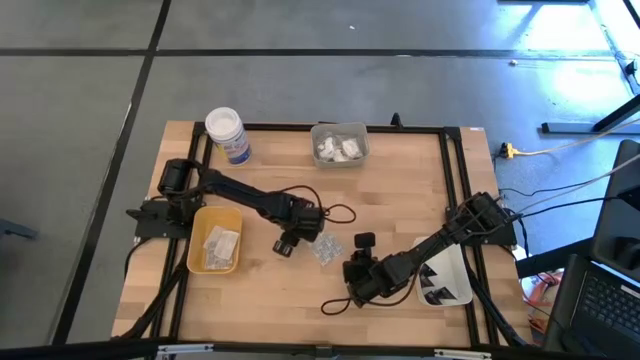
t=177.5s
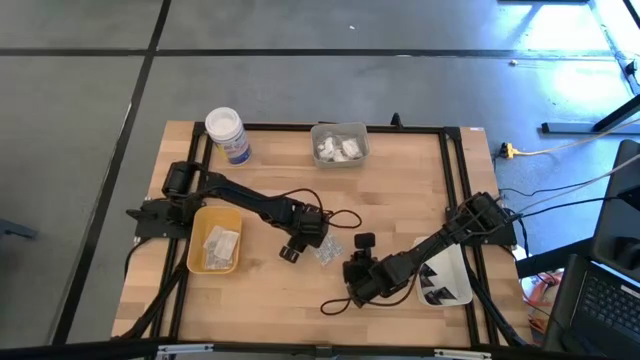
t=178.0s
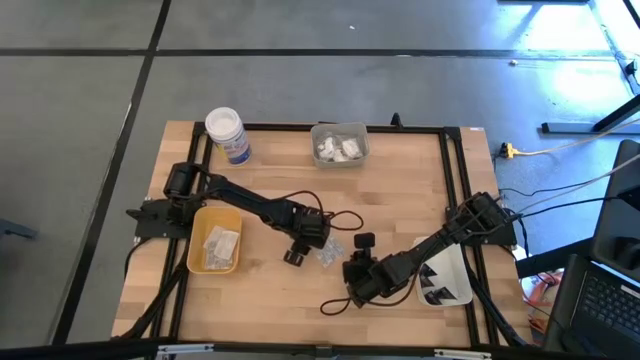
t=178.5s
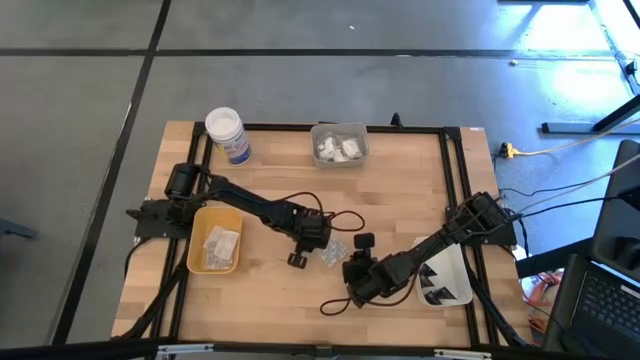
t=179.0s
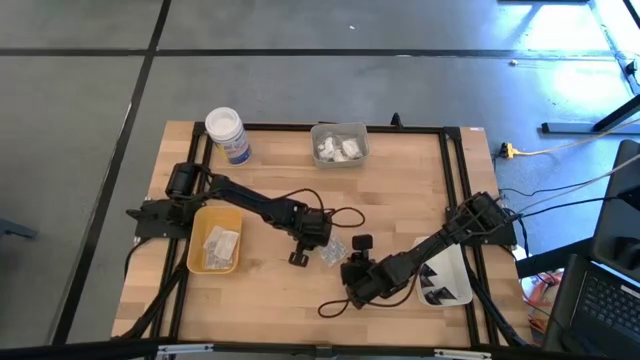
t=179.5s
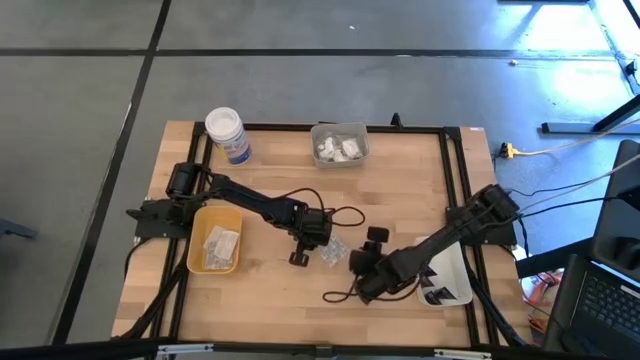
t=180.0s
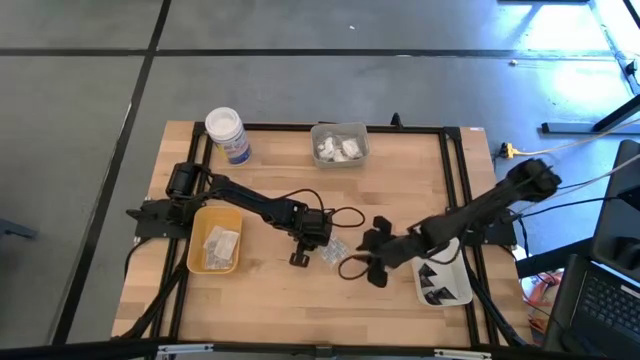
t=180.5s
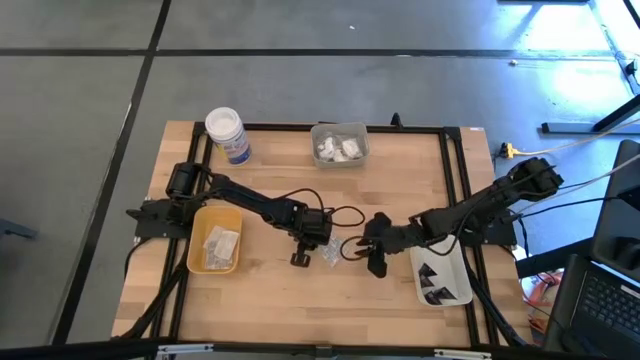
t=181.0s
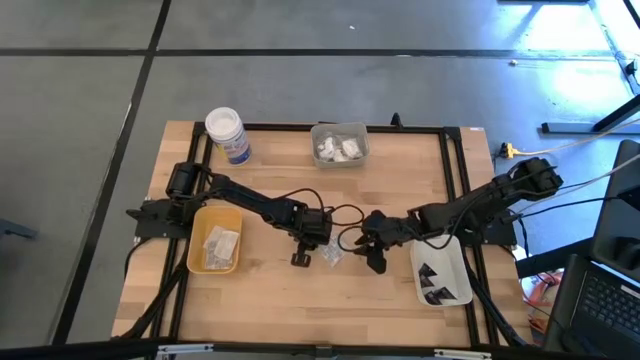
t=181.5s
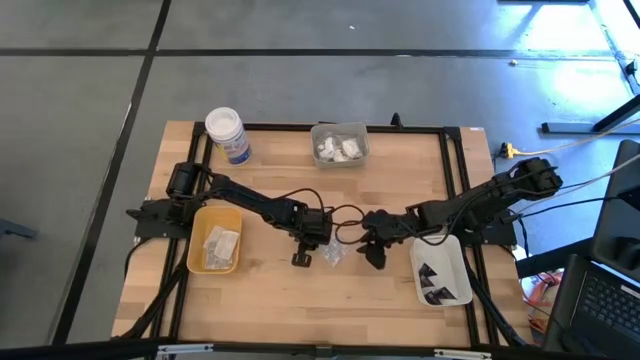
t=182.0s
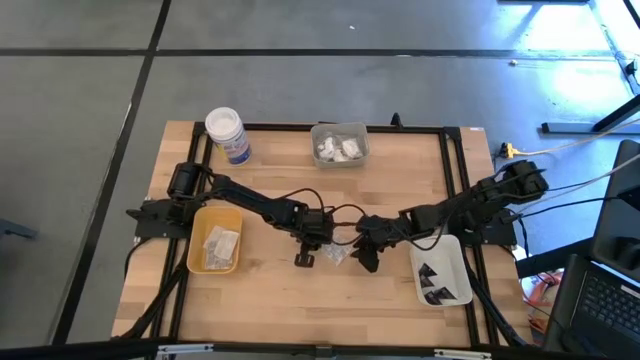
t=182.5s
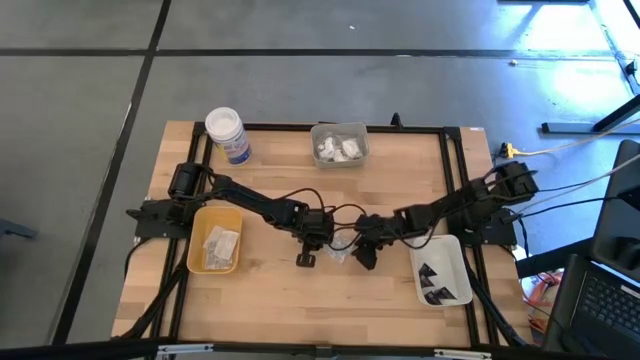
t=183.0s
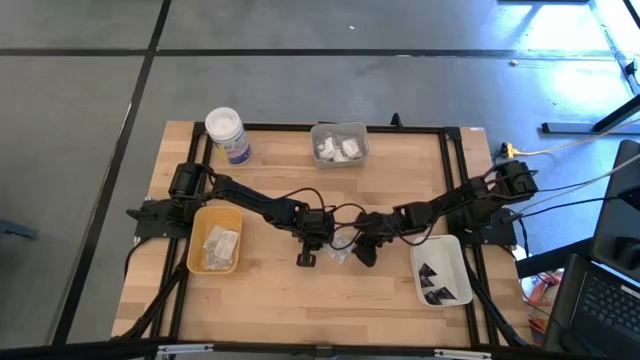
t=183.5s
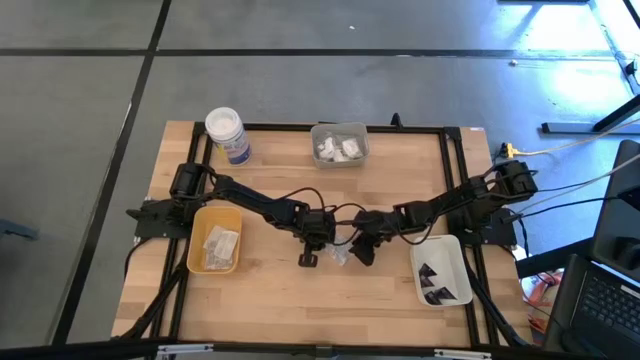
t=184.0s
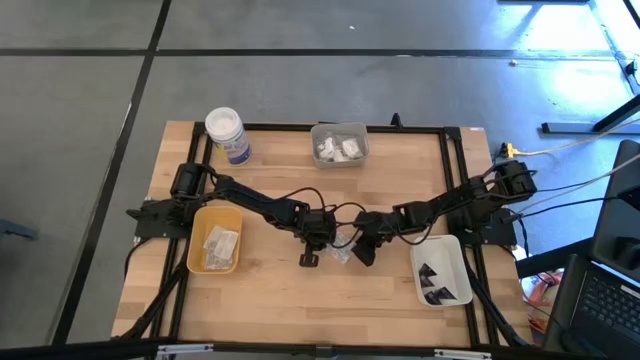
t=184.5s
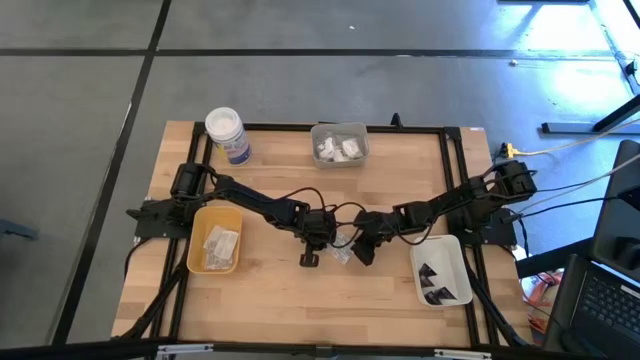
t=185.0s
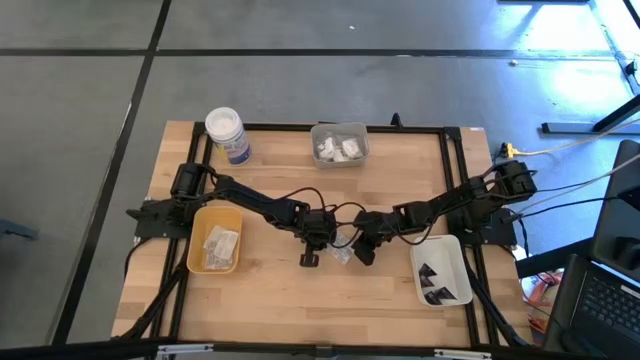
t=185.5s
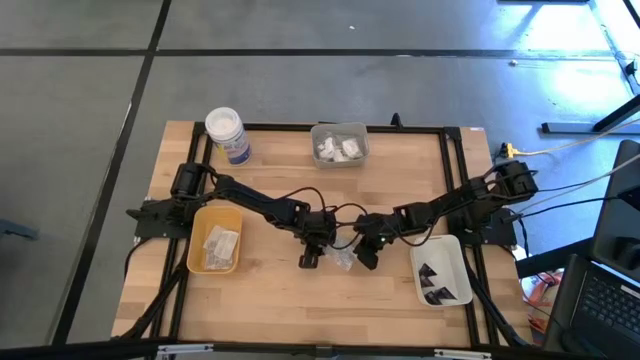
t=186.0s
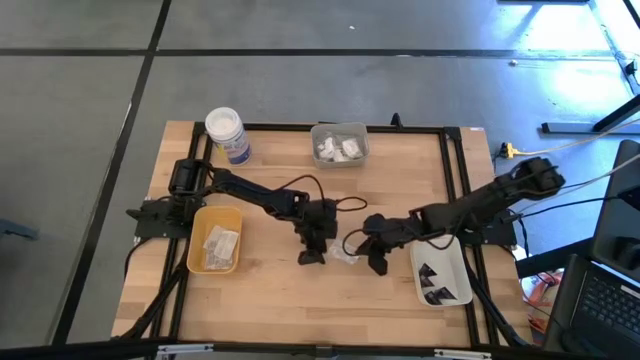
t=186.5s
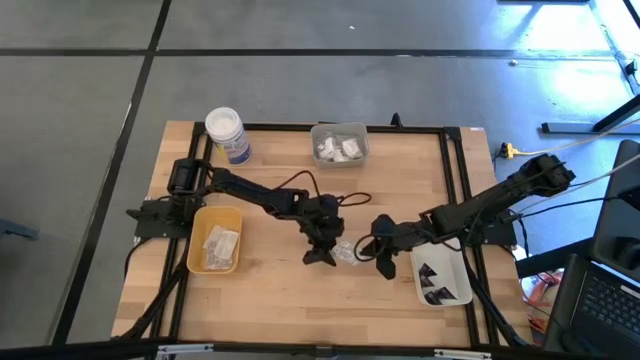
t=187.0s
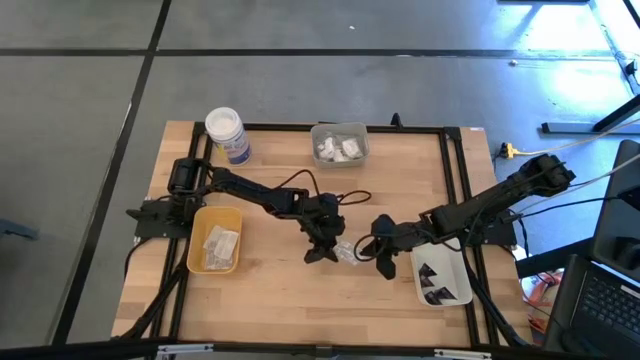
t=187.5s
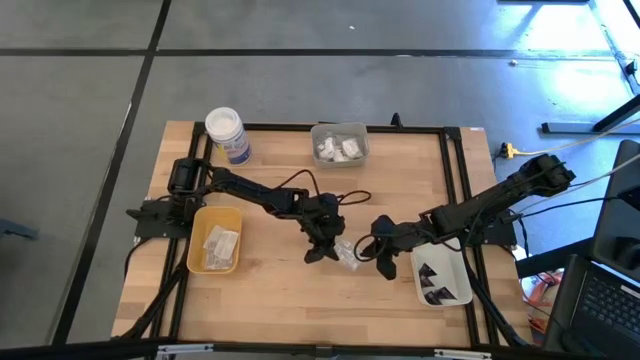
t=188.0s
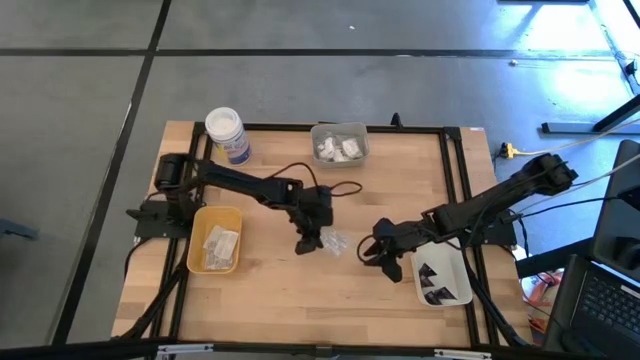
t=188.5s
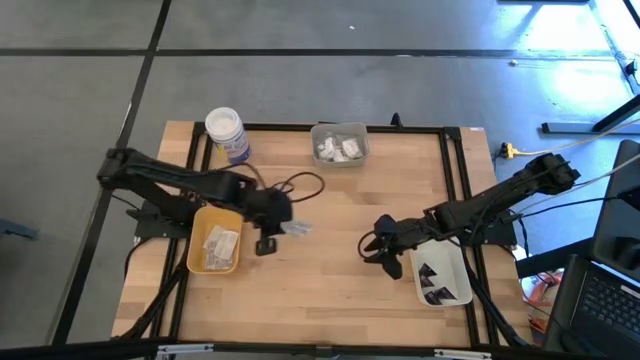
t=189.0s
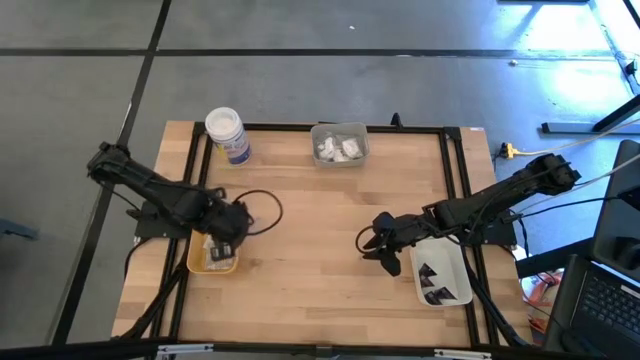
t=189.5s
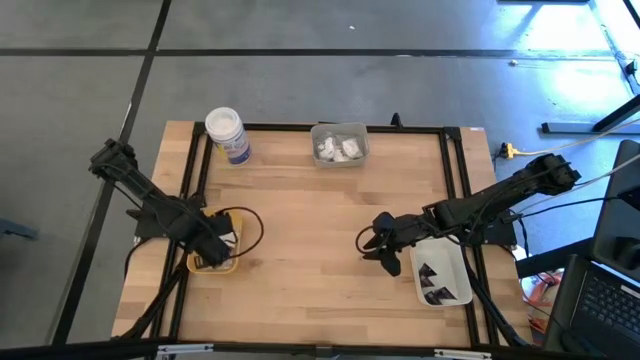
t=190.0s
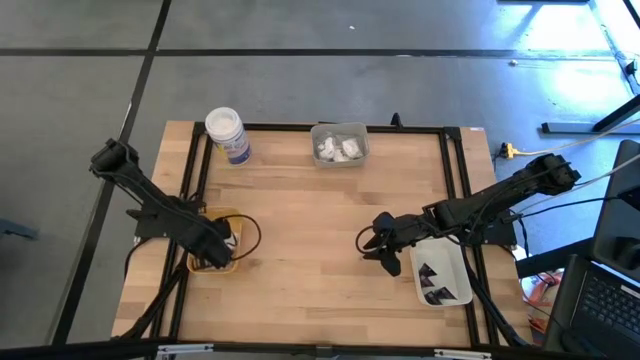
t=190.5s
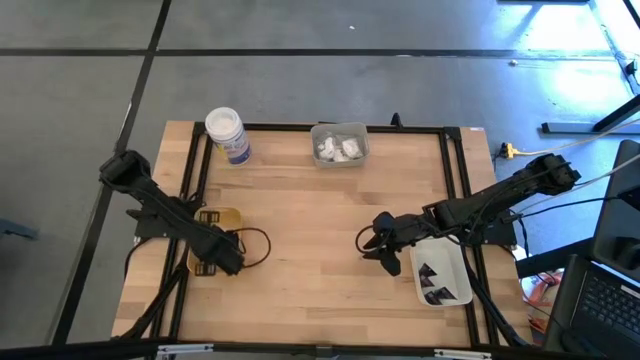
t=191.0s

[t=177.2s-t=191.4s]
Task: Pick & Place Travel size toiletries
Put the white bandage pack into the yellow bin

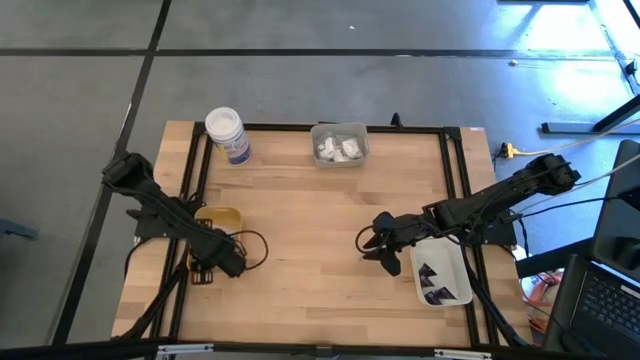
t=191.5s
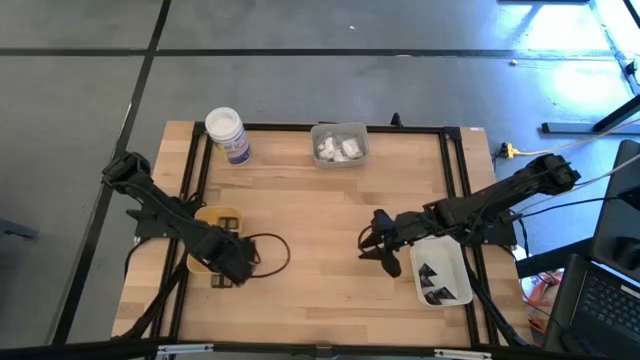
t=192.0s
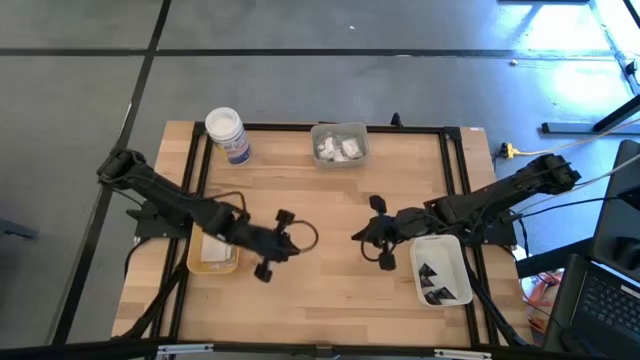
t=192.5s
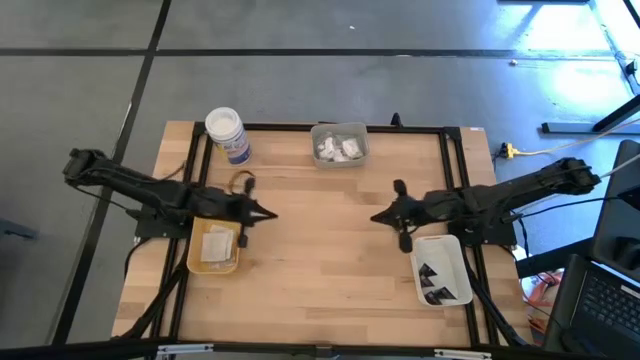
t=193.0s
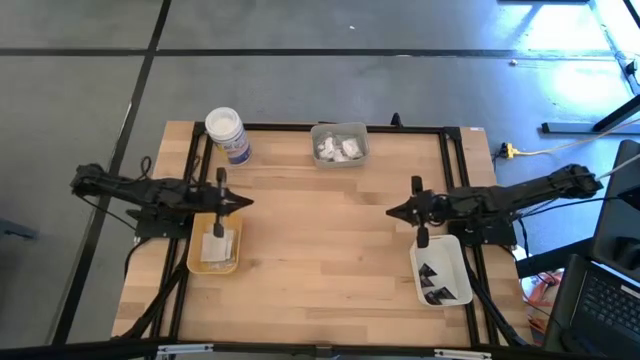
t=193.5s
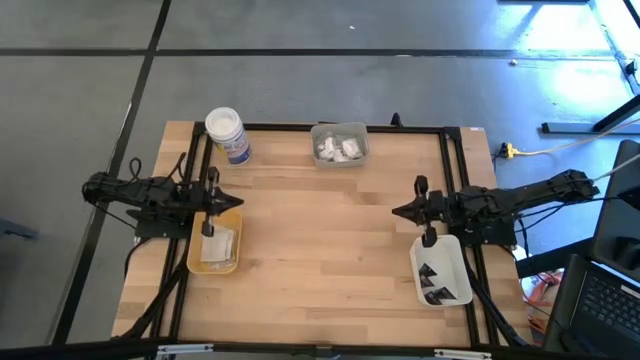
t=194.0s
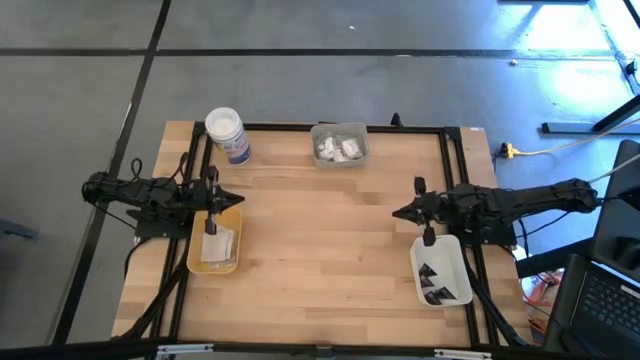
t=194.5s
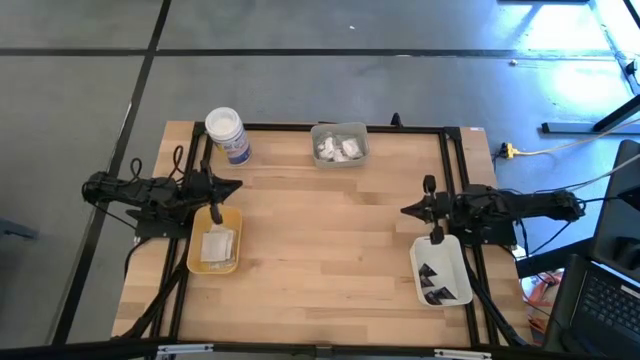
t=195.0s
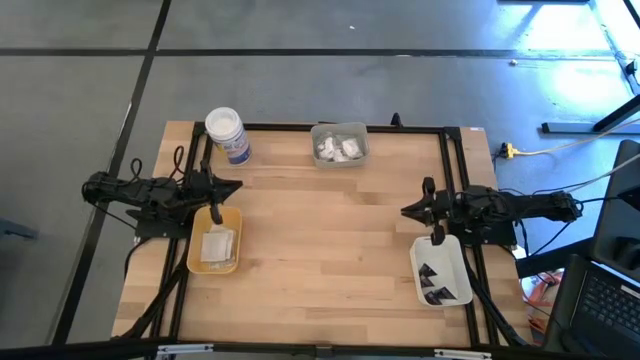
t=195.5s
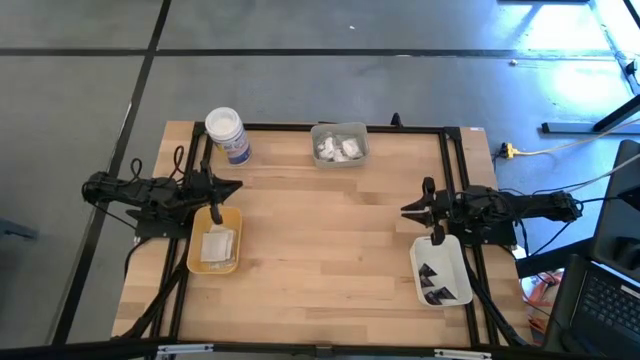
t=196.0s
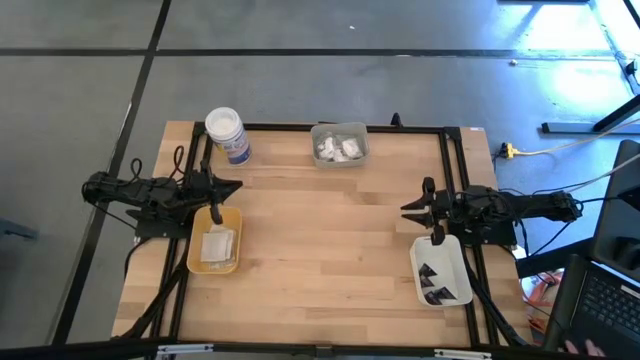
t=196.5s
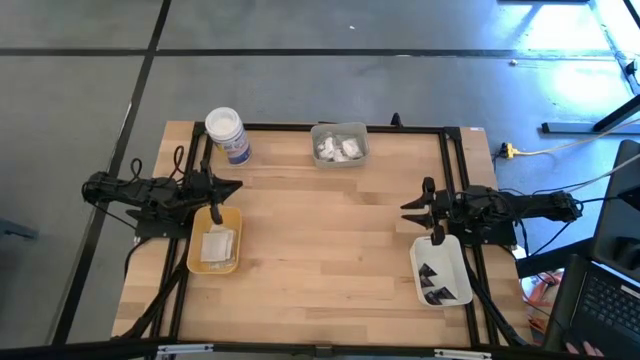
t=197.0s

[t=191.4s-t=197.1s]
Return to Home Position
